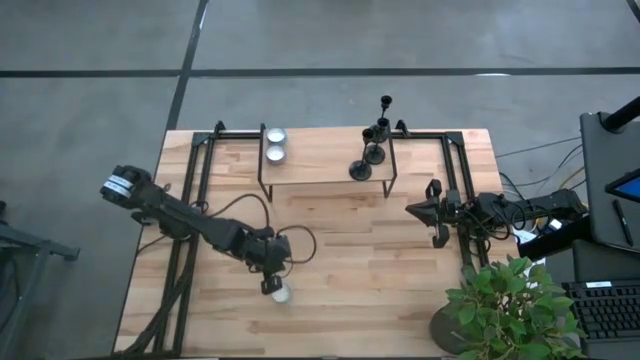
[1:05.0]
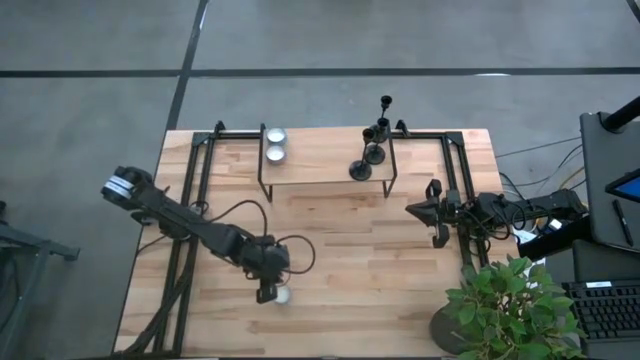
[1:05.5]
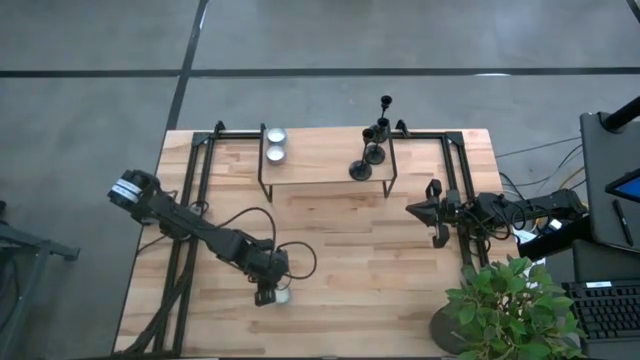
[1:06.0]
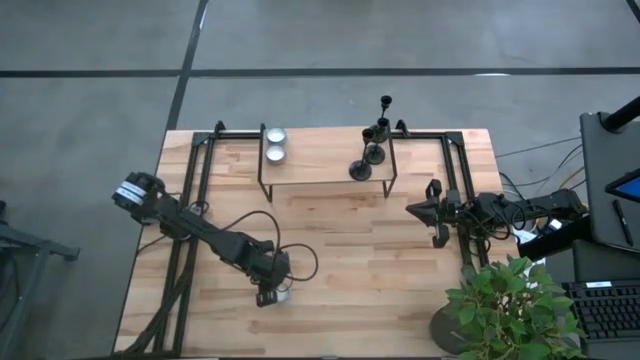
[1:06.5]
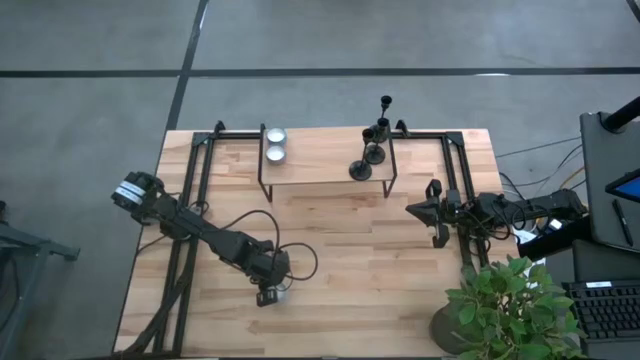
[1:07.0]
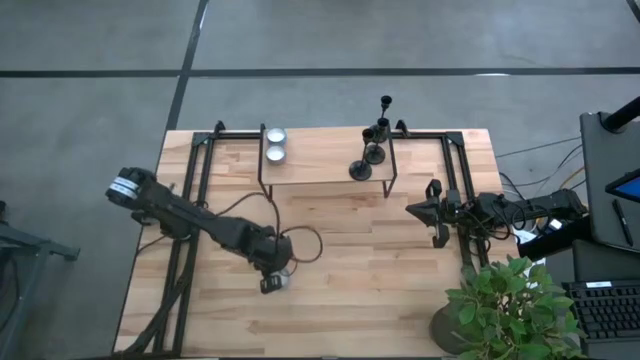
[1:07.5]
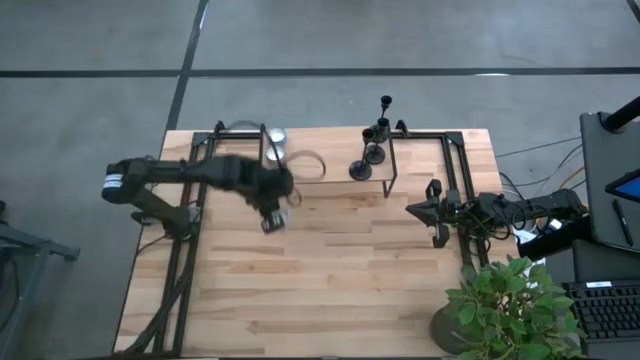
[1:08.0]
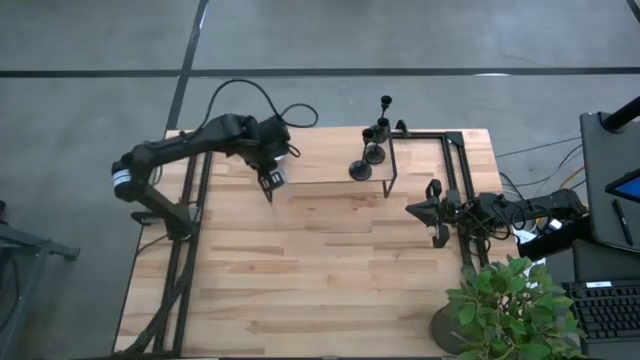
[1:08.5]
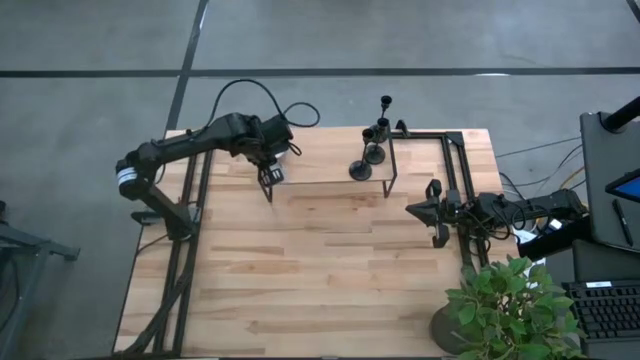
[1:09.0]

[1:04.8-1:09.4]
Task: Pick & Place candle stick holders
Put the red scented candle on the shelf aligned with the other scented candles

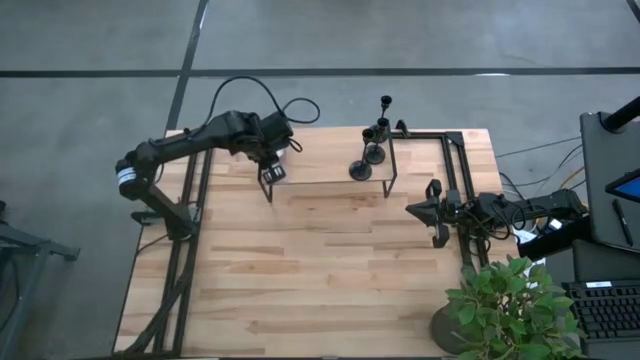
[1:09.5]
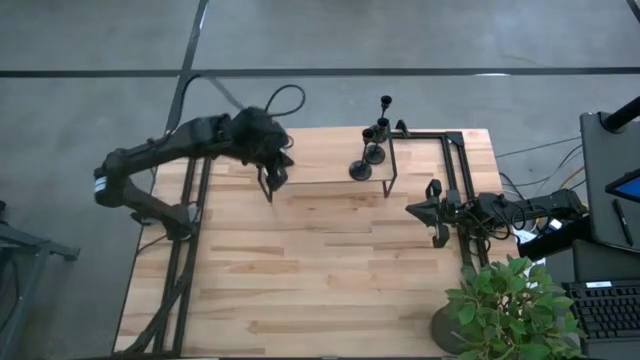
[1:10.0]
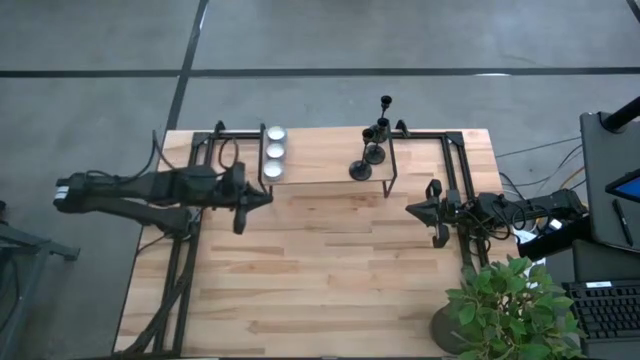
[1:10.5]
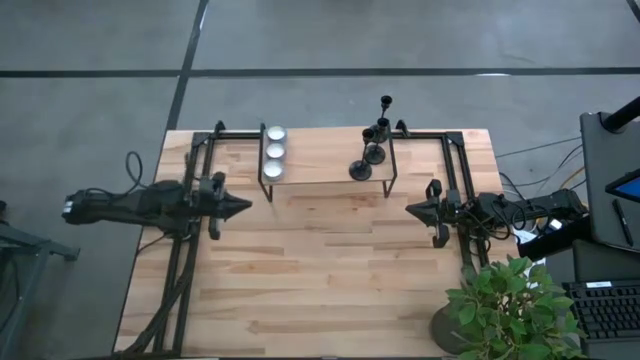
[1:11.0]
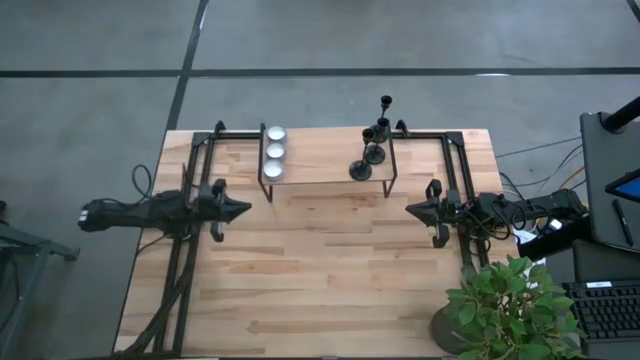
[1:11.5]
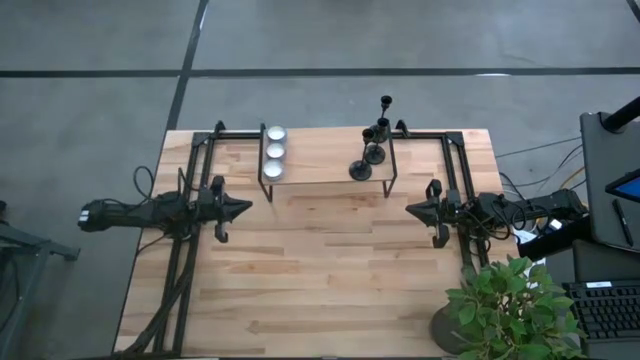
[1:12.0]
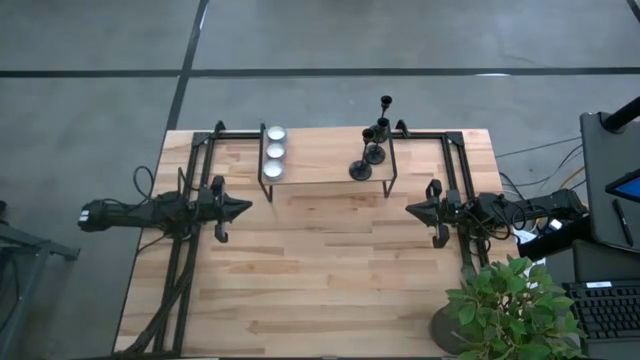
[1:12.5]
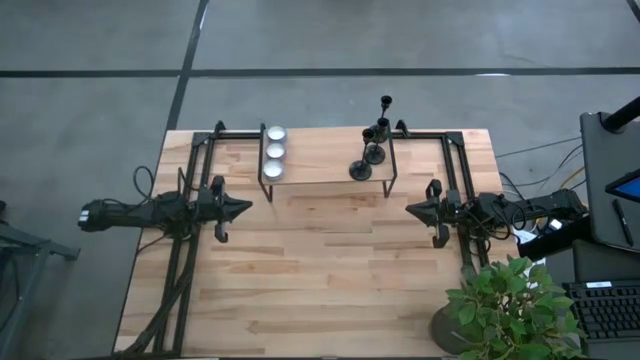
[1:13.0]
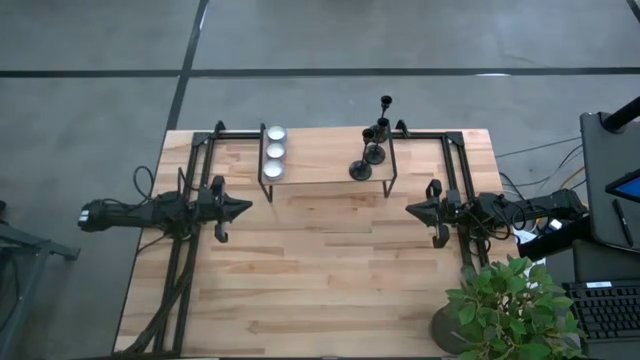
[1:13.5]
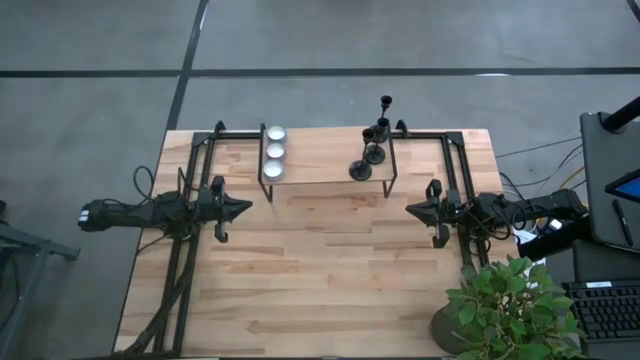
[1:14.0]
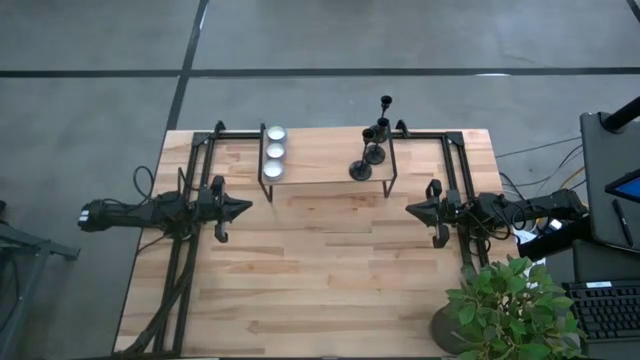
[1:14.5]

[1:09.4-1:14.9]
Return to Home Position

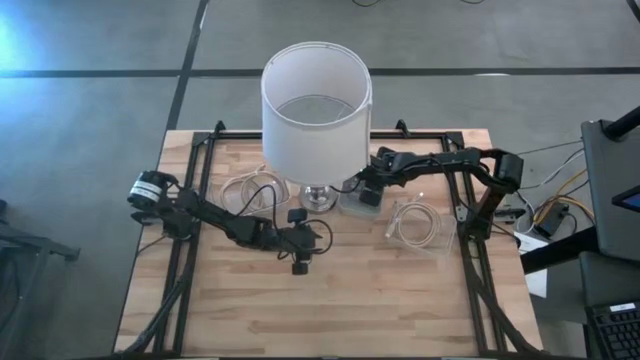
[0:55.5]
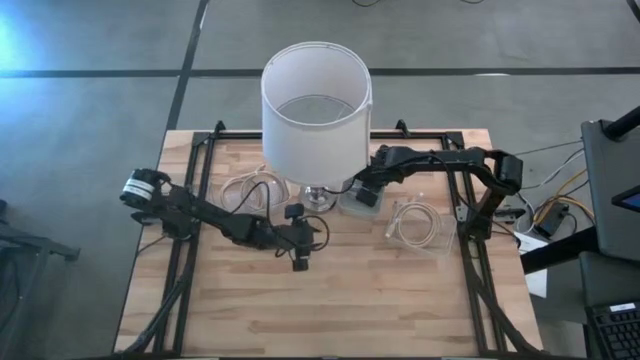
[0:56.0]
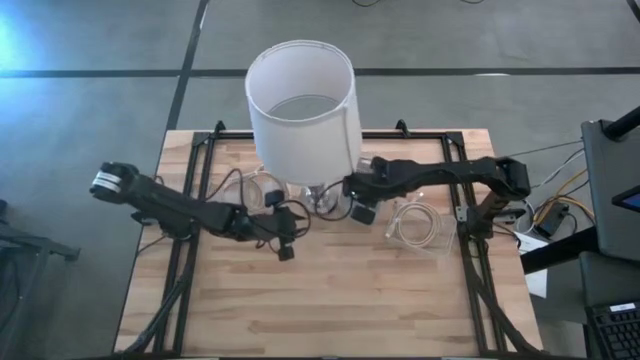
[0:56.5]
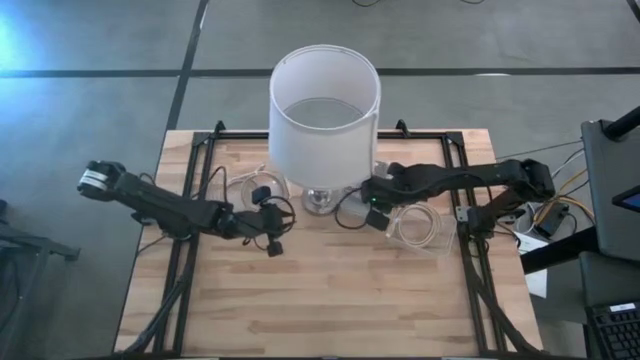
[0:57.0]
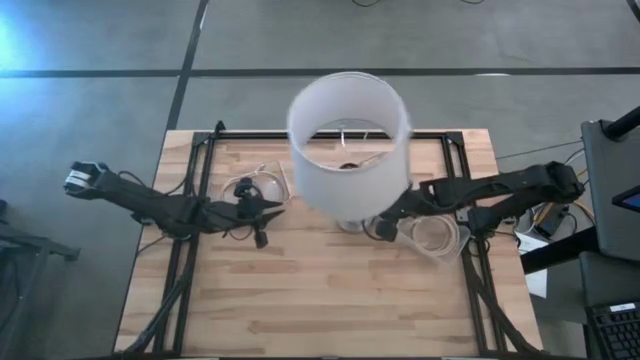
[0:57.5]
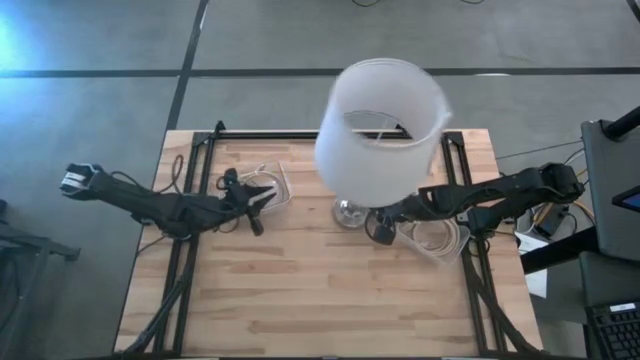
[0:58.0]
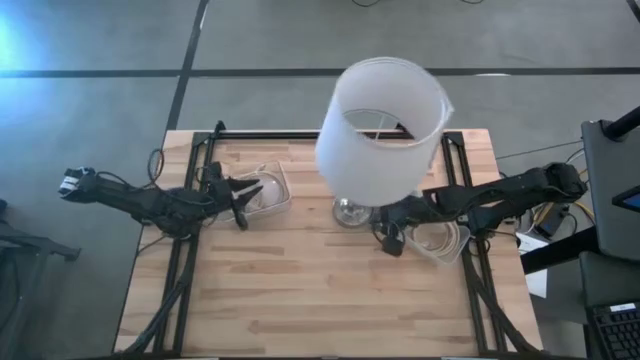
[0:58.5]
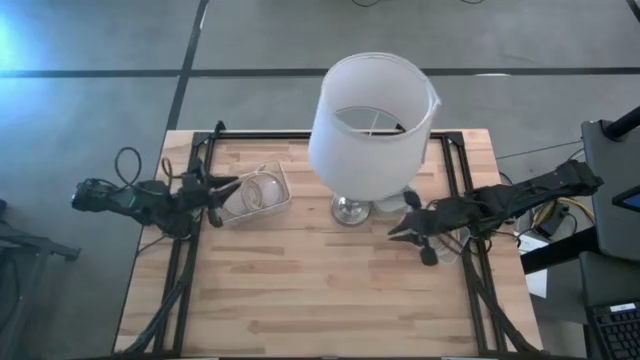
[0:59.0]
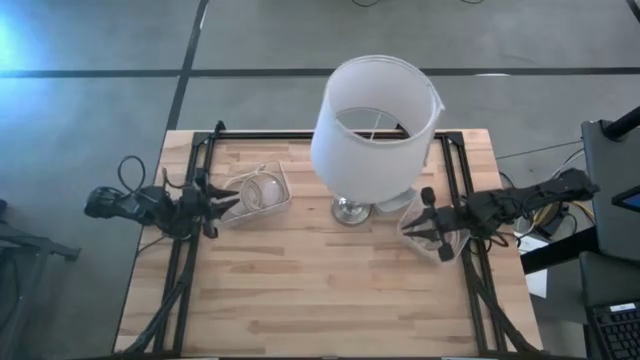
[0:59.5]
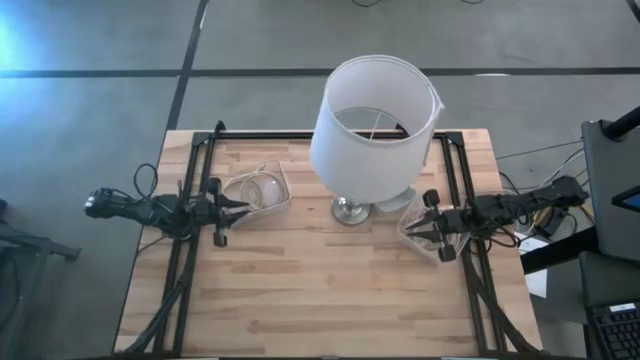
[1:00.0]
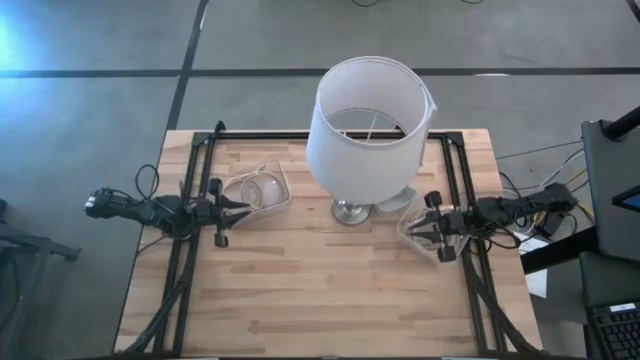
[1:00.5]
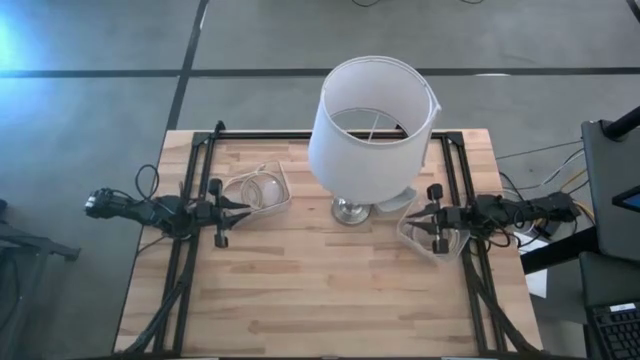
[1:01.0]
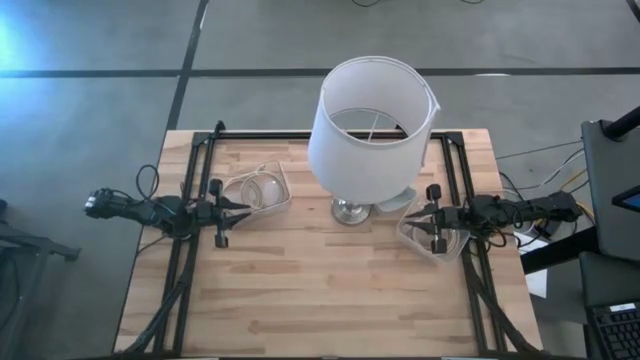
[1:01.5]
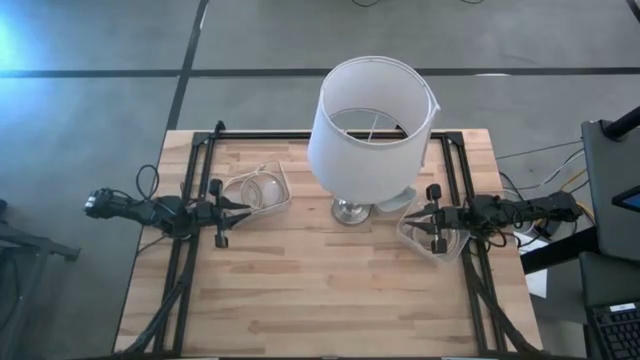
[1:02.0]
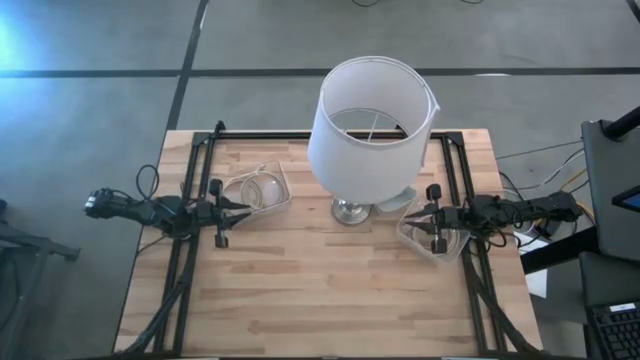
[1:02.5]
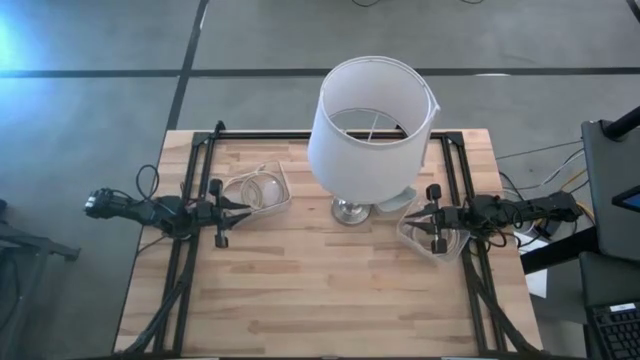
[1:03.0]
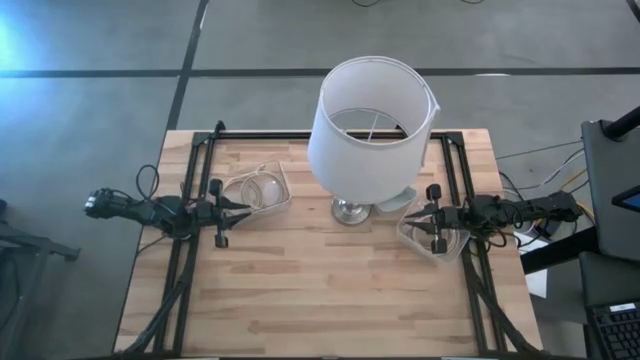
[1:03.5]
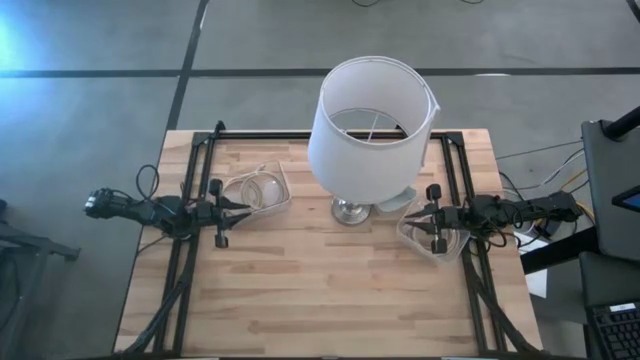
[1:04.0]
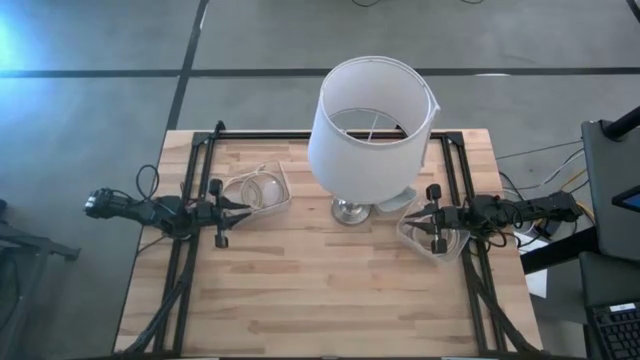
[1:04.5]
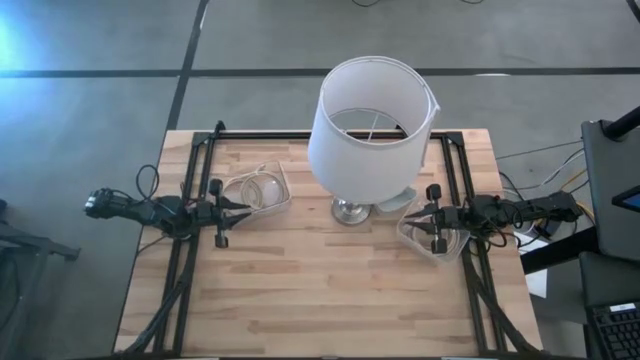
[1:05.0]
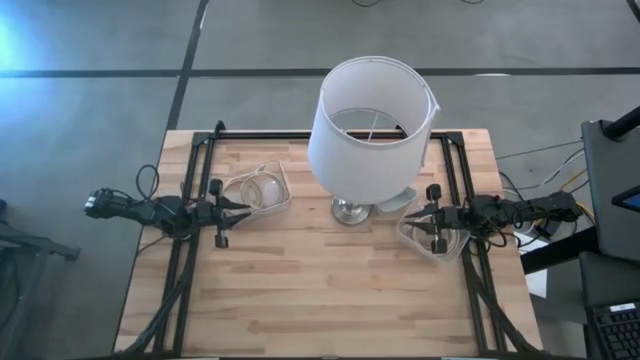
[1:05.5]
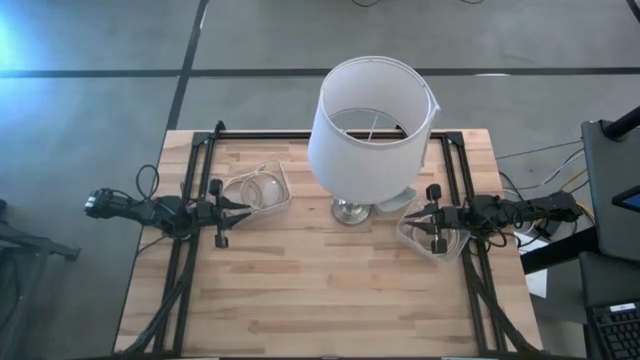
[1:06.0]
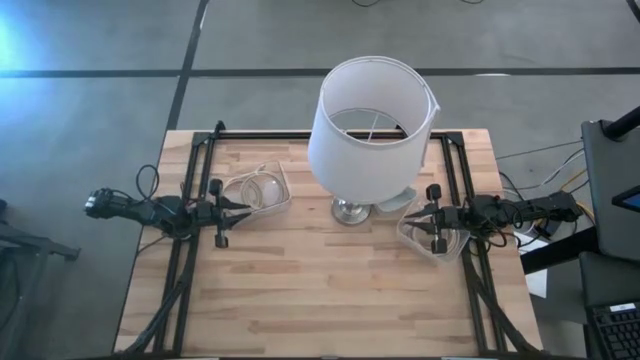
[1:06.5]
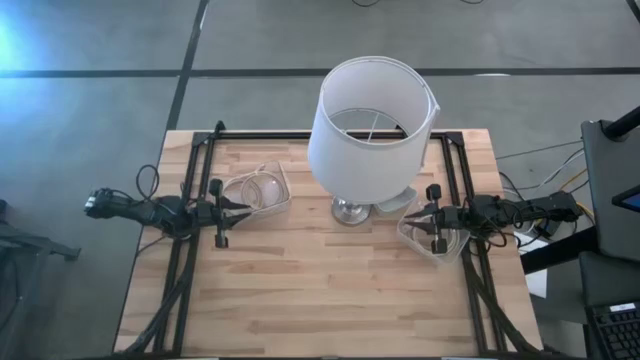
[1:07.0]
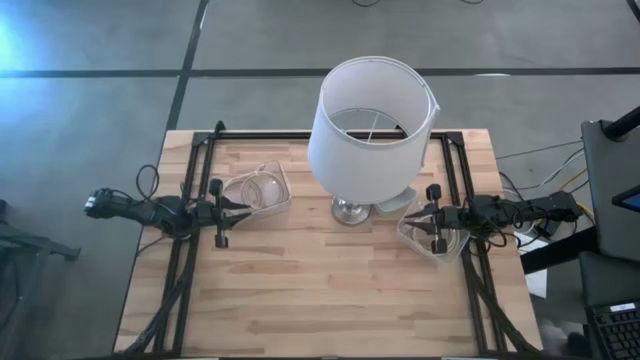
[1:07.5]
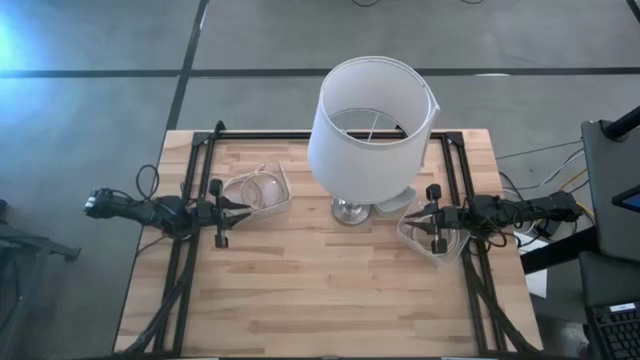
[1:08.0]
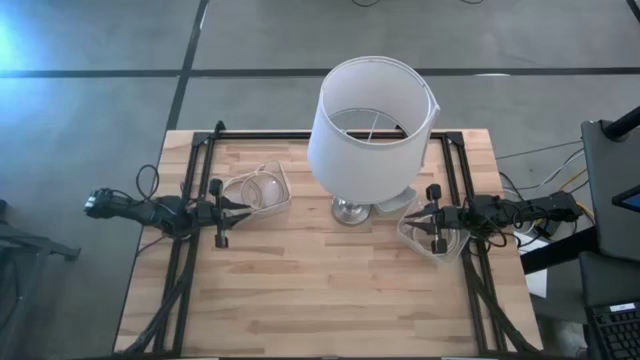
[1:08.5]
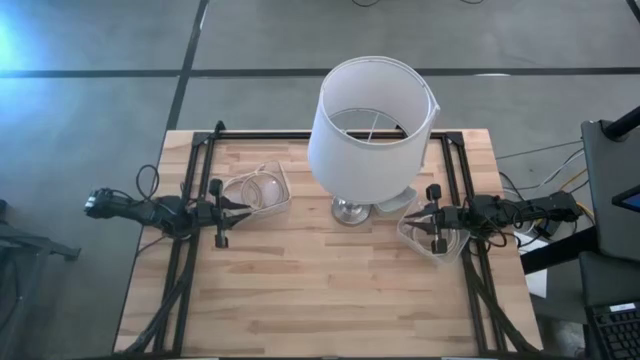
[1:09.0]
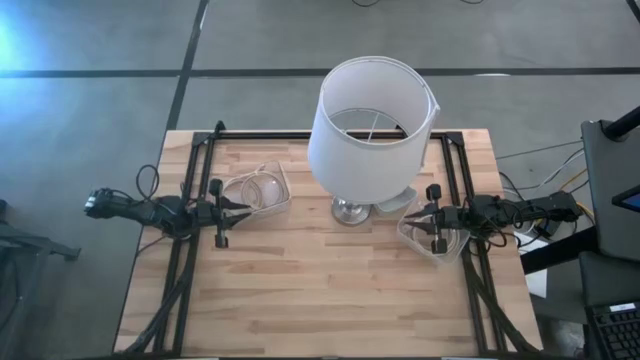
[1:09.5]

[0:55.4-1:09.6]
Task: Pick & Place USB Port
Return to Home Position
